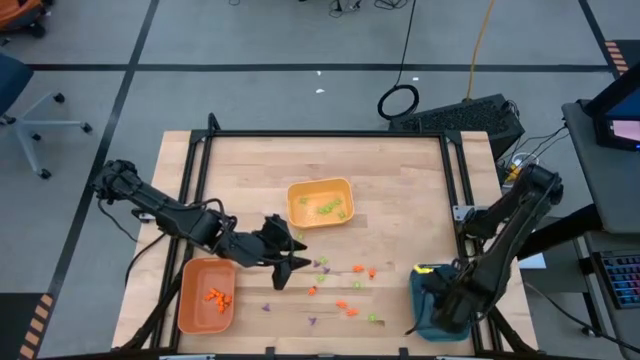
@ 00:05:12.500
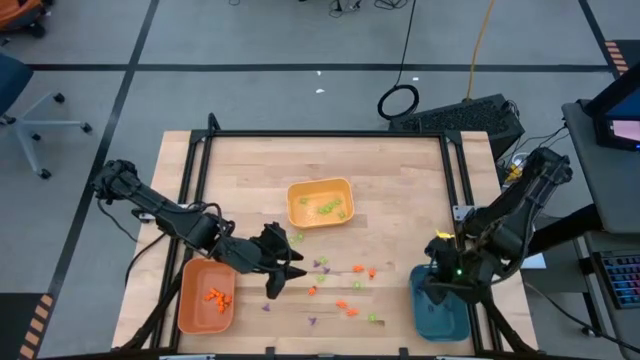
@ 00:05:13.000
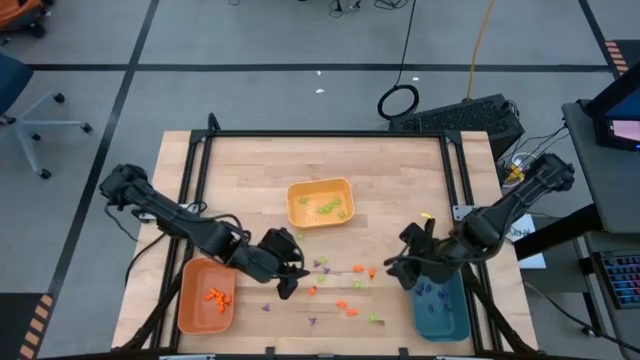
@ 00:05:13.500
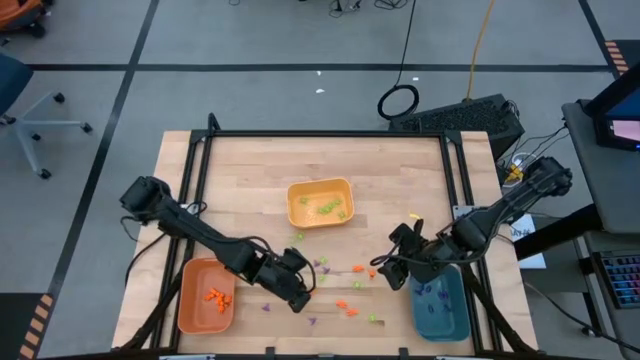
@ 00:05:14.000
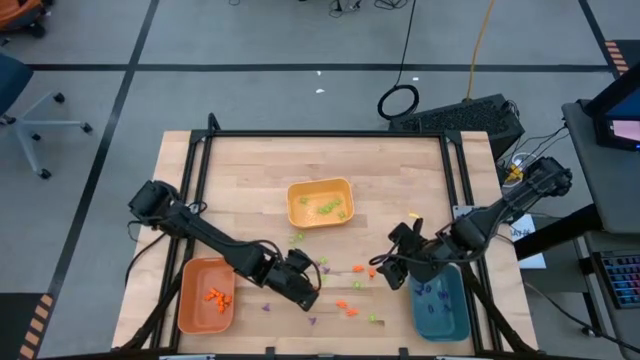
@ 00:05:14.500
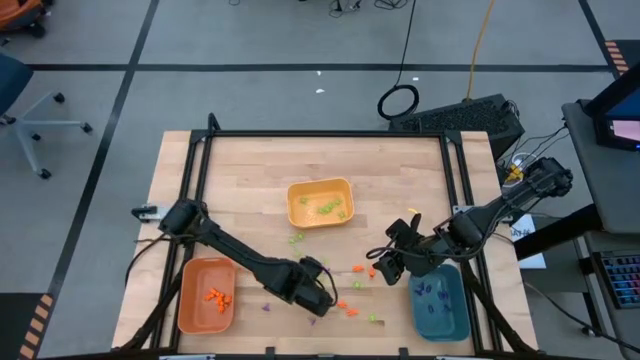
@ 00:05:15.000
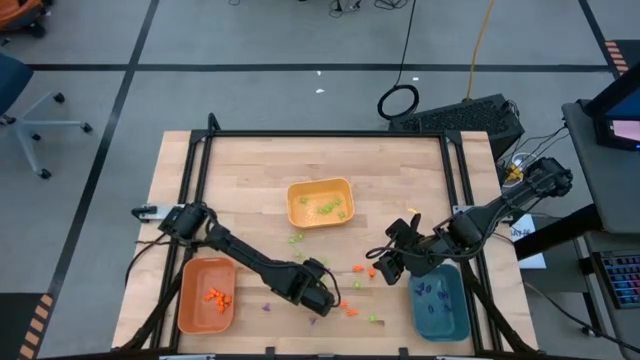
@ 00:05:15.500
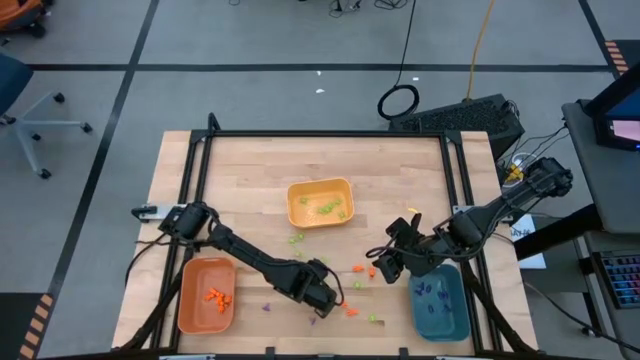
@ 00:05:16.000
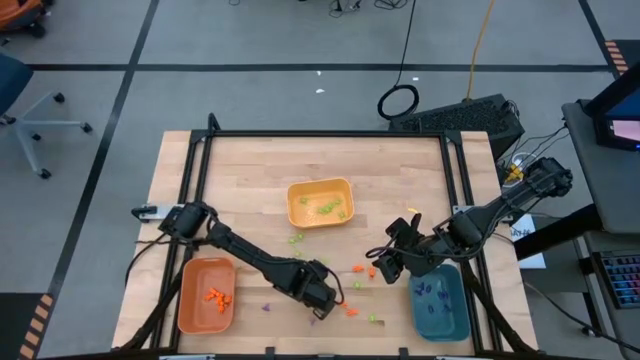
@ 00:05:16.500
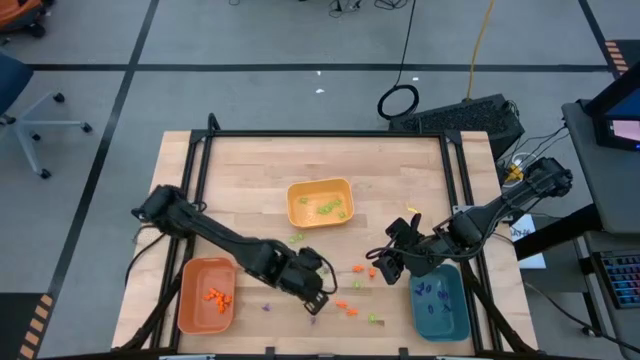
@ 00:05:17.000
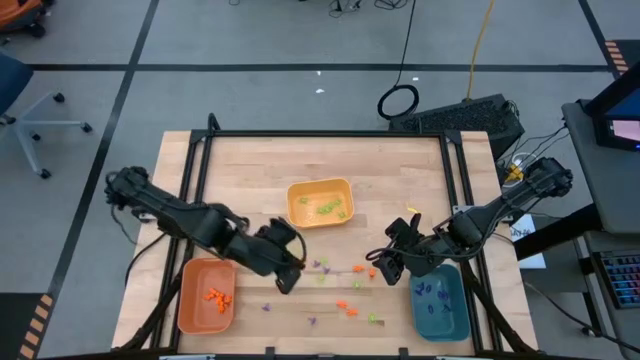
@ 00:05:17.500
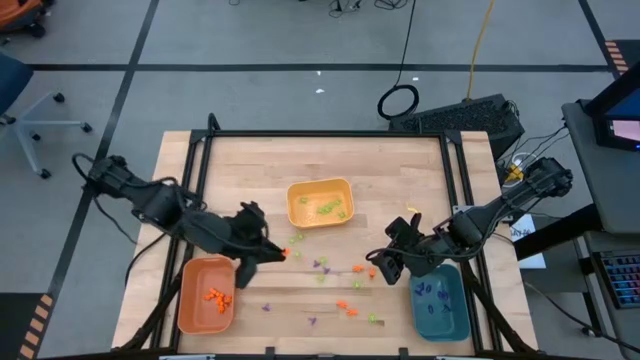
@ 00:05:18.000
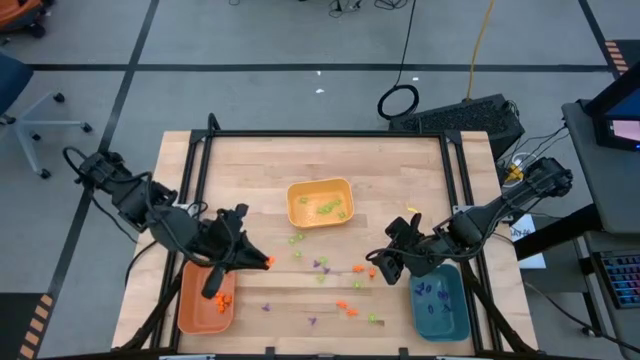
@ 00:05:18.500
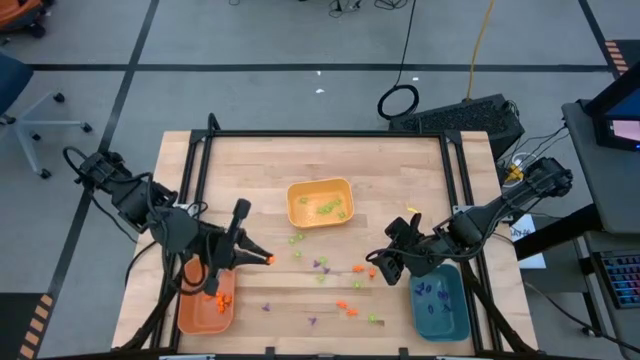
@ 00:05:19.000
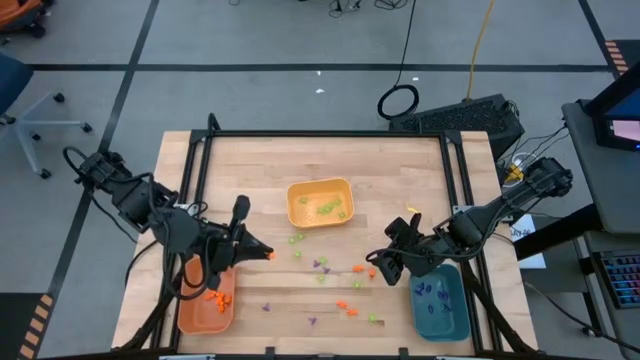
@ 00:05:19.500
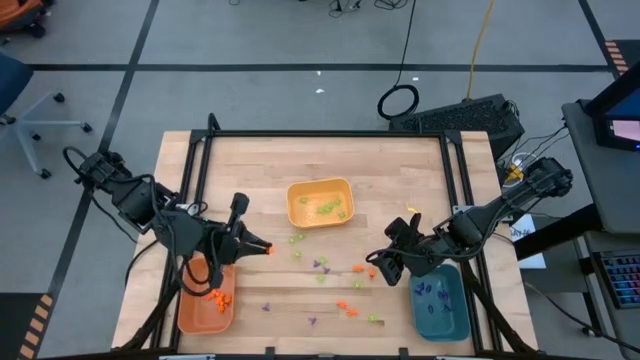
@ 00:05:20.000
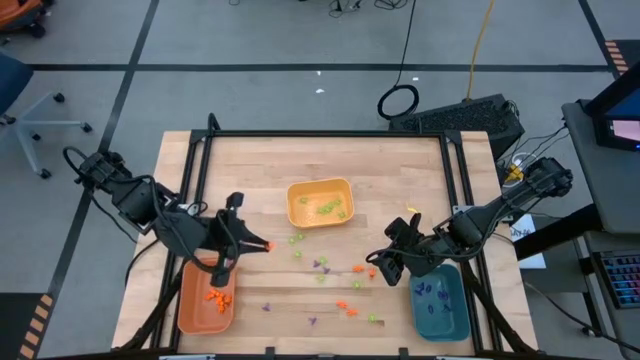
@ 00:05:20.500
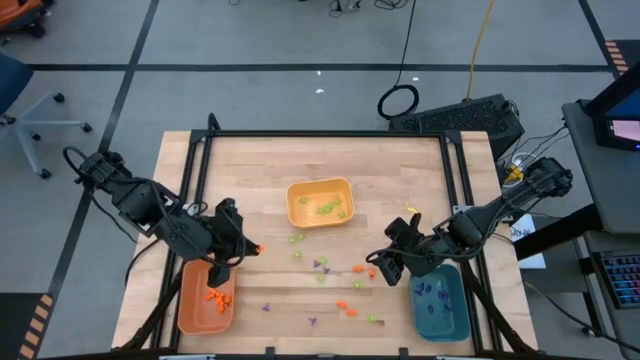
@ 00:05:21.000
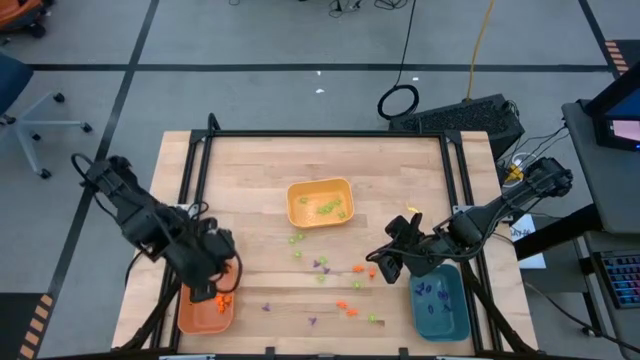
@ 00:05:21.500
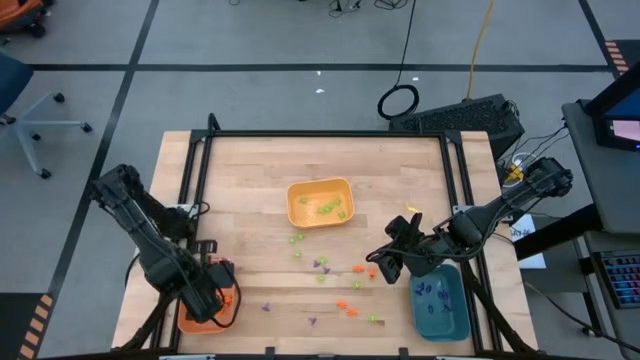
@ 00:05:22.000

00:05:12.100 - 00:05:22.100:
Task: Sort Halloween decoration
Put the orange skeleton toy into the orange bin

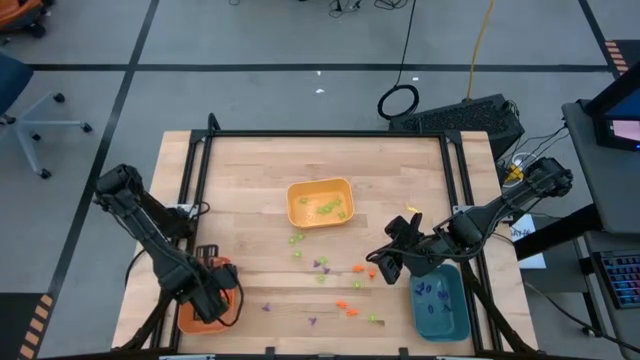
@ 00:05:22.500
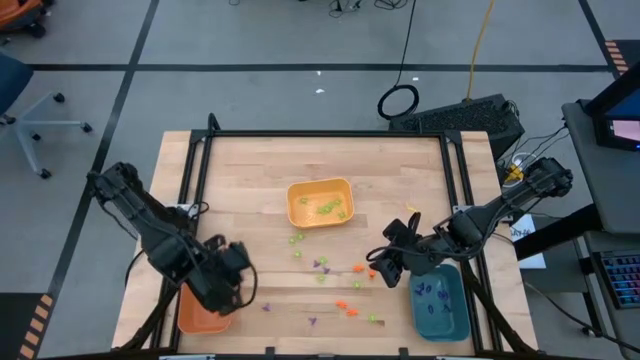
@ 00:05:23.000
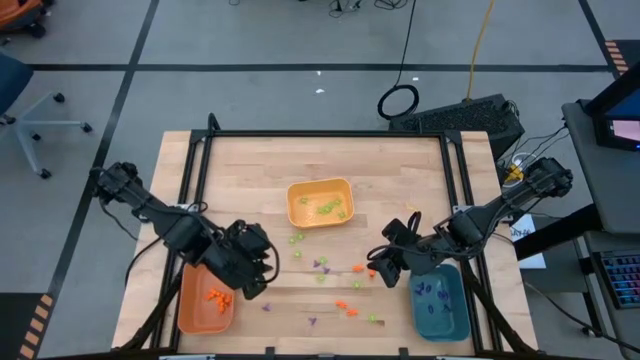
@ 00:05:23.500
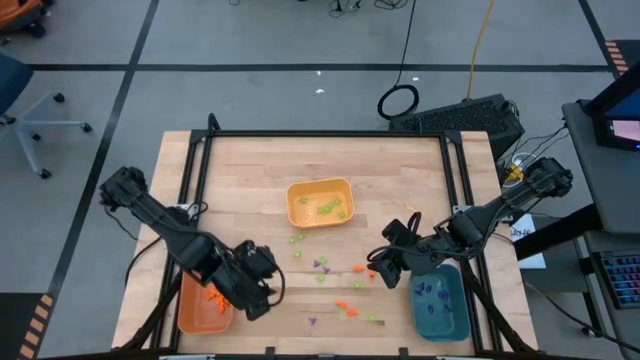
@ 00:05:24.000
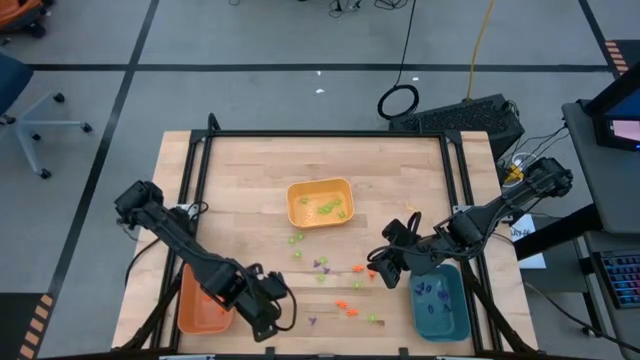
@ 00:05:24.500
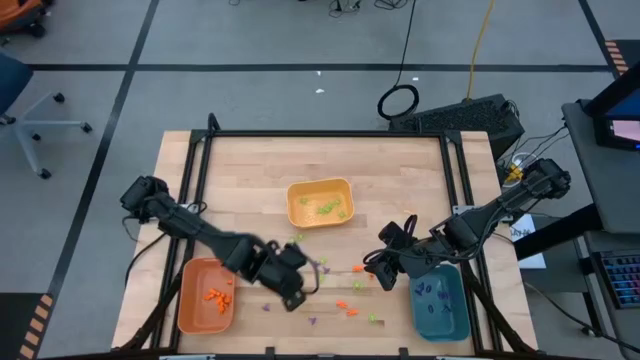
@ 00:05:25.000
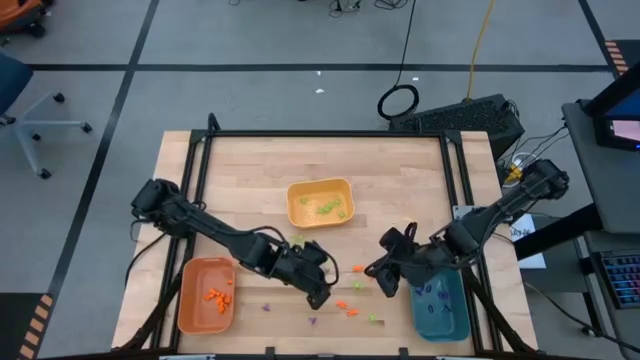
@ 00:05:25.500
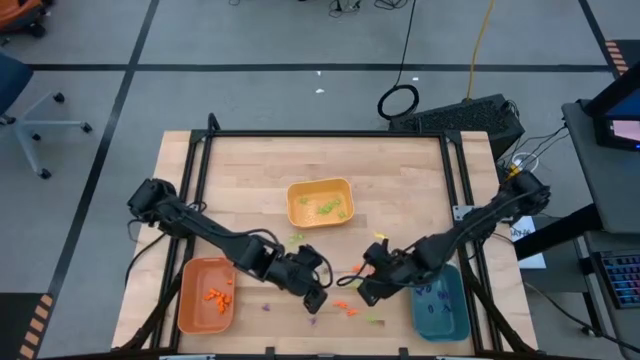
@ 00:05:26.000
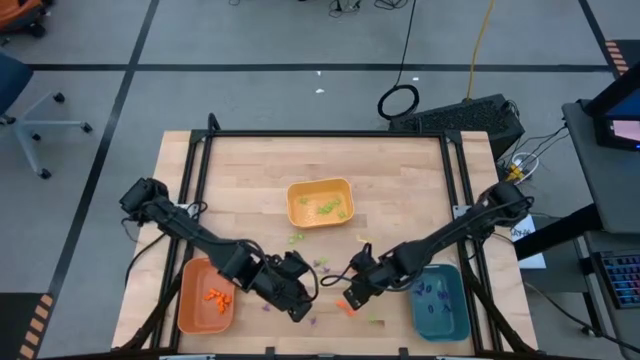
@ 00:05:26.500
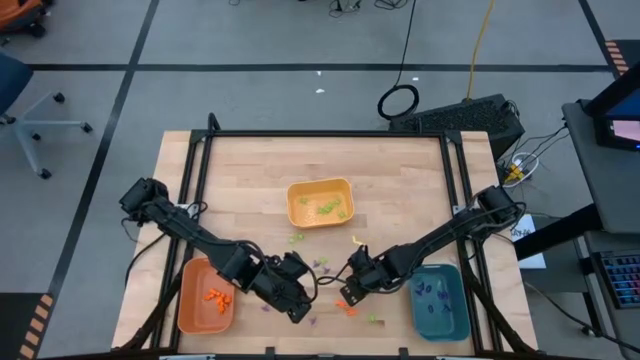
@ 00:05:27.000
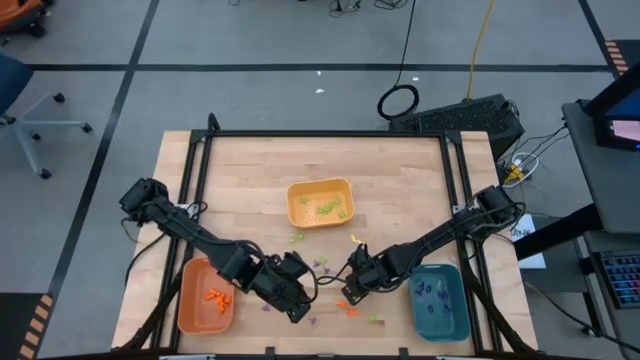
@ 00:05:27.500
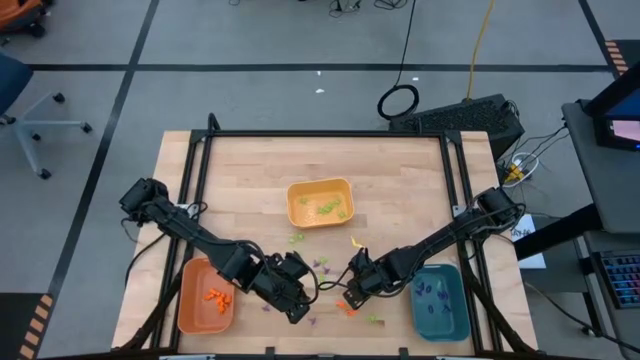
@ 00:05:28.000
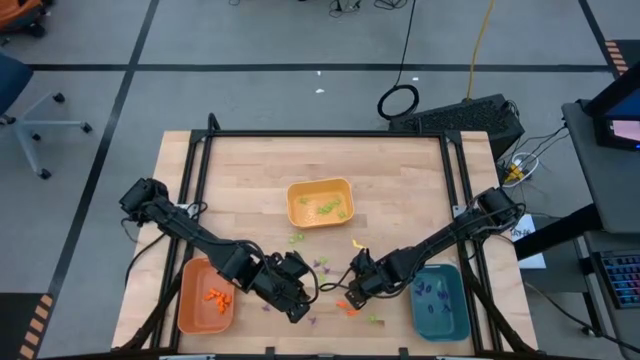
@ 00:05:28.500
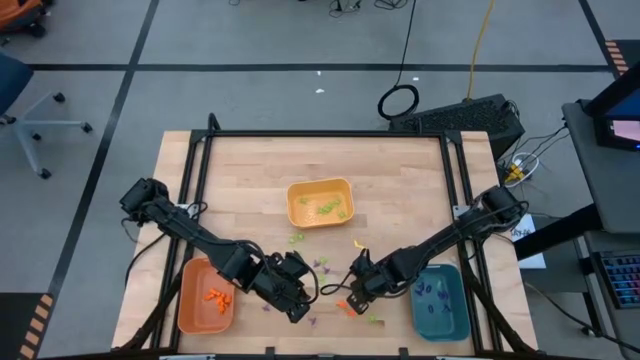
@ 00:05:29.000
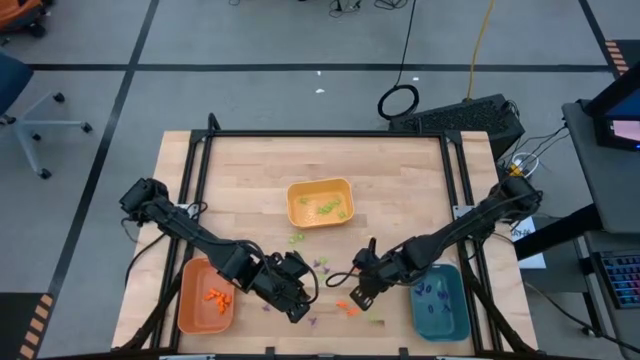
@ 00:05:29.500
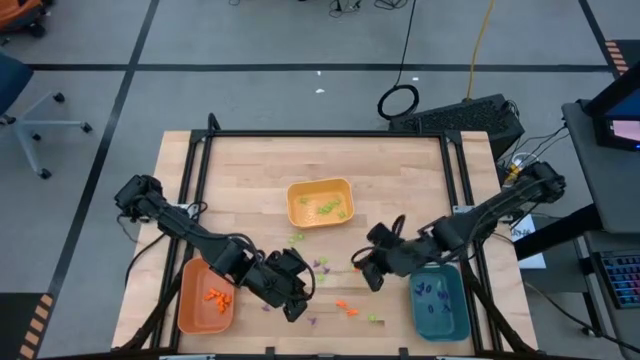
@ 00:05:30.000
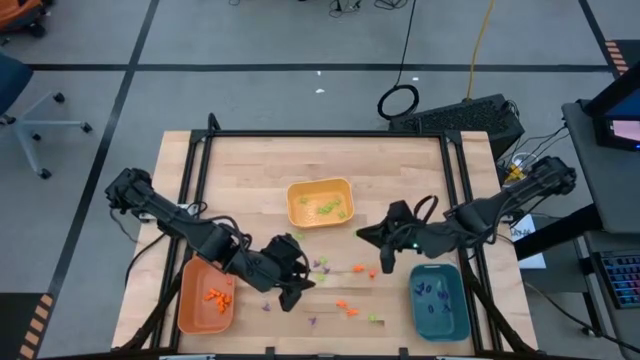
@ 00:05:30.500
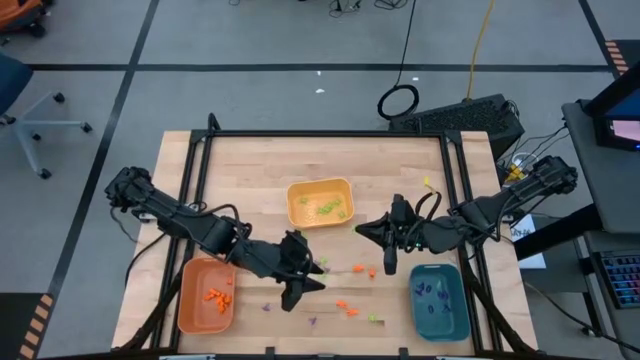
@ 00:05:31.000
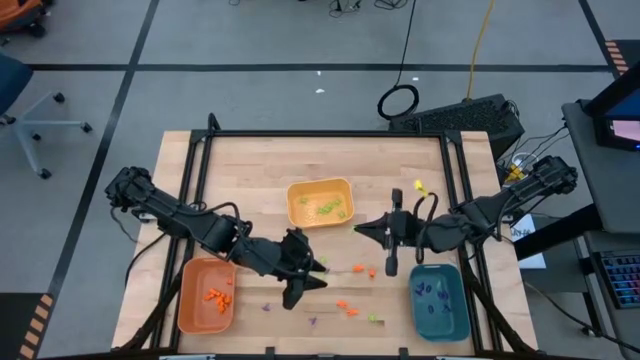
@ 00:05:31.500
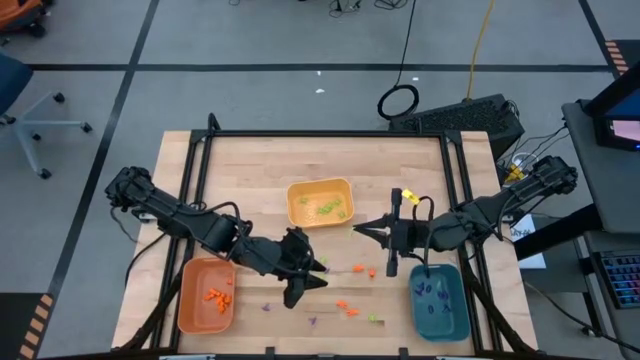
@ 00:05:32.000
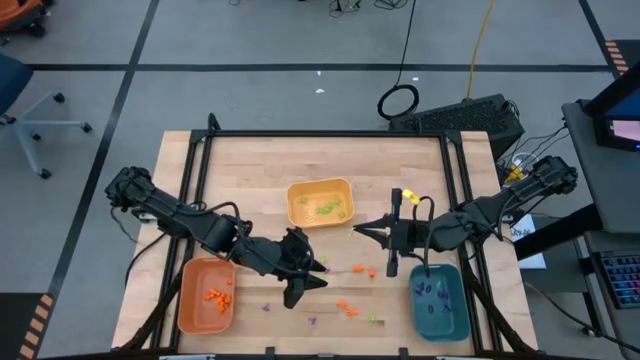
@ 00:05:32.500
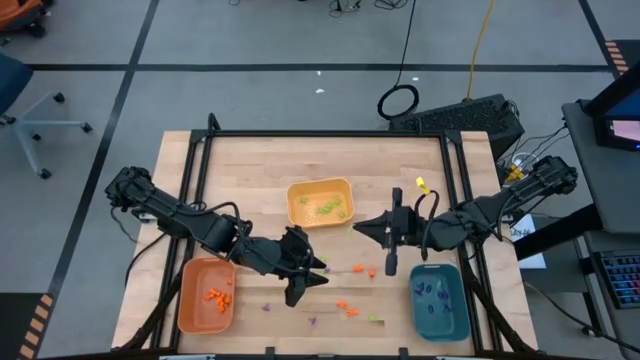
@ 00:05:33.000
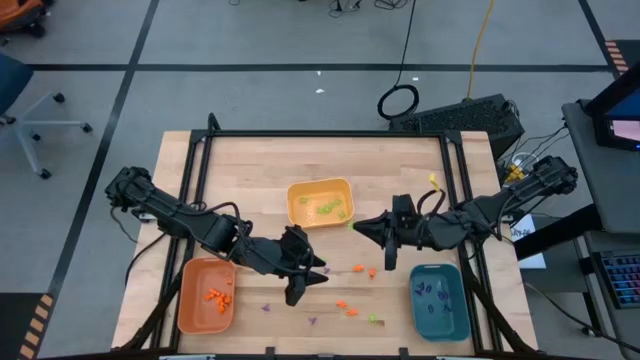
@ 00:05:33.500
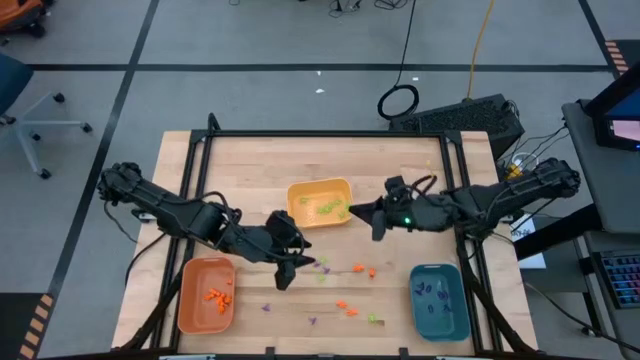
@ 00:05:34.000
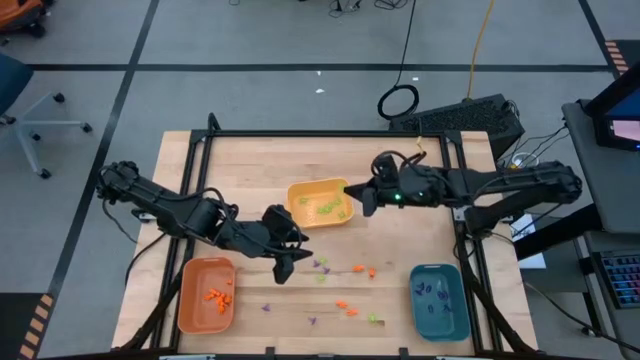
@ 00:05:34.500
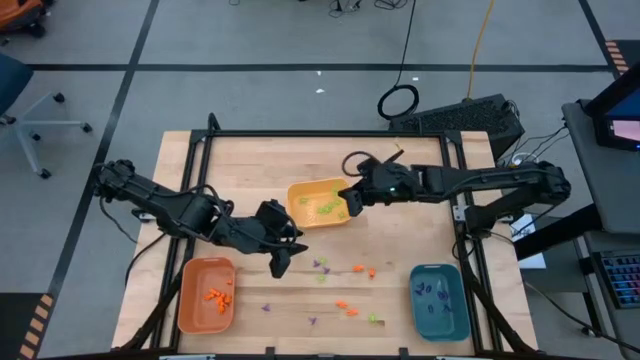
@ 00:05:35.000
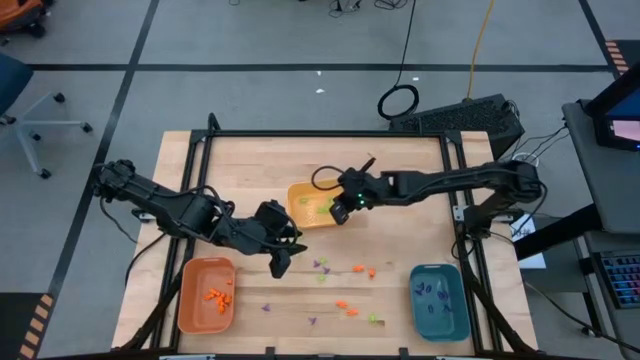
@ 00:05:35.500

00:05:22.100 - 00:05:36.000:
Put the green spider toy into the yellow bin
